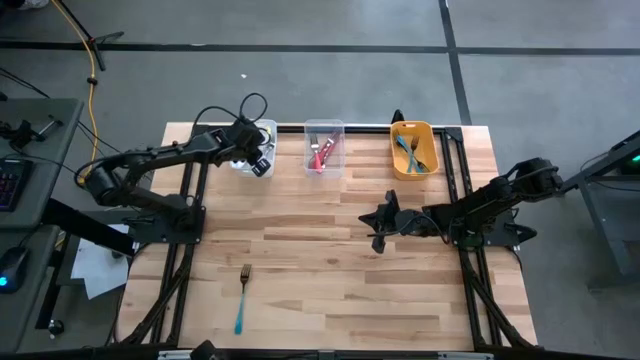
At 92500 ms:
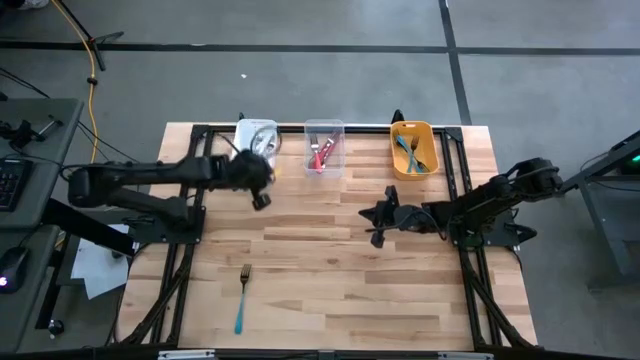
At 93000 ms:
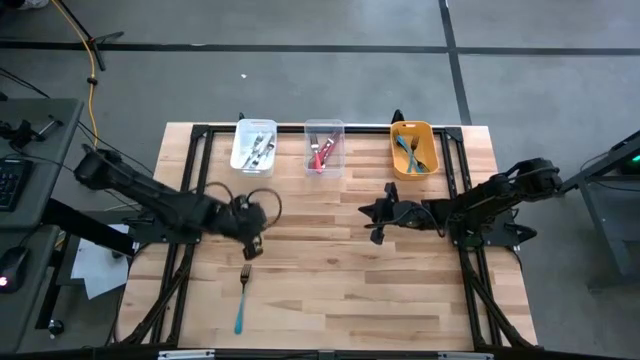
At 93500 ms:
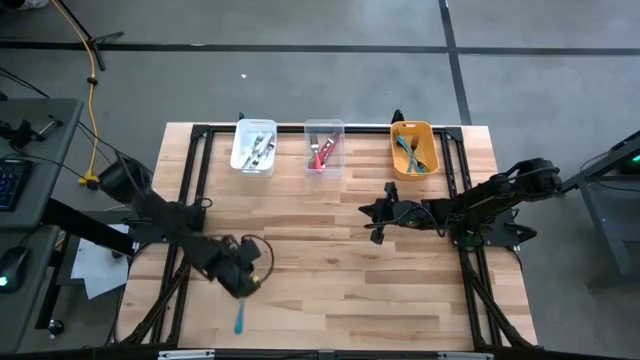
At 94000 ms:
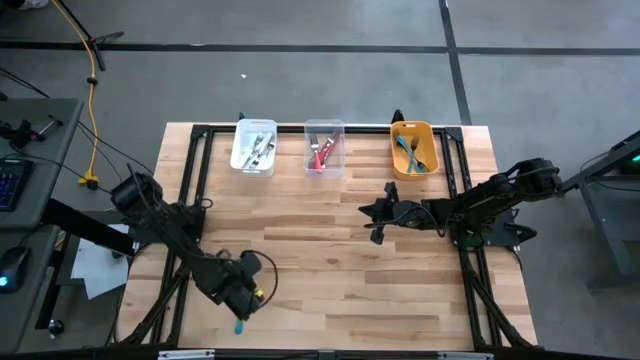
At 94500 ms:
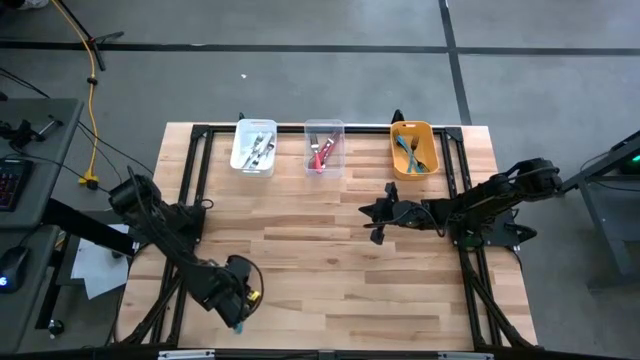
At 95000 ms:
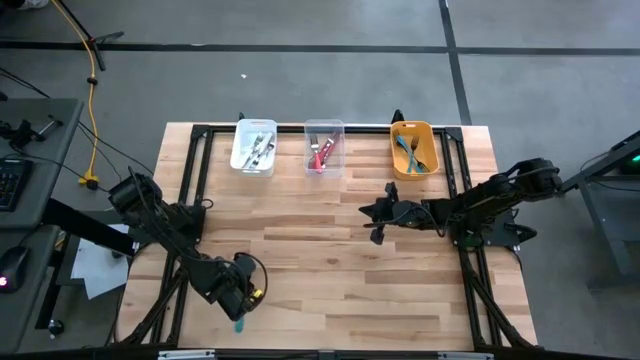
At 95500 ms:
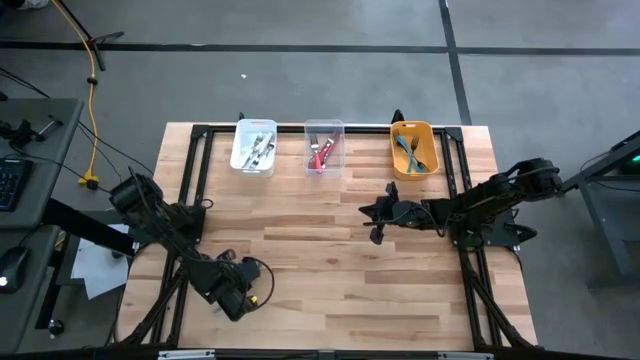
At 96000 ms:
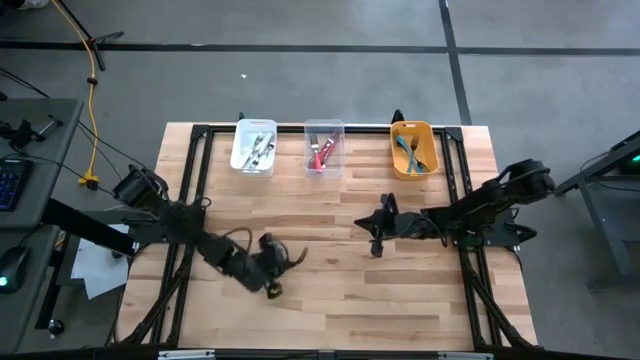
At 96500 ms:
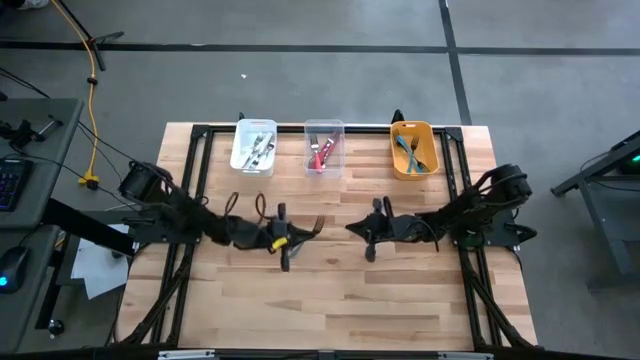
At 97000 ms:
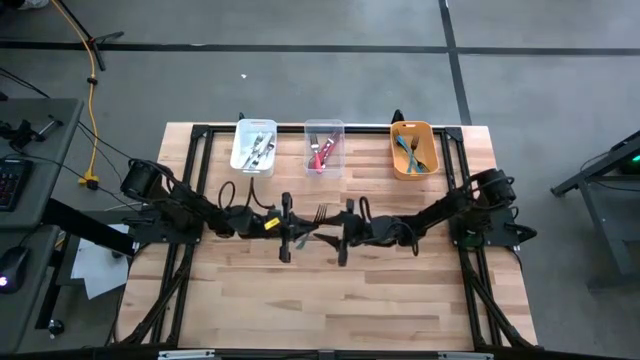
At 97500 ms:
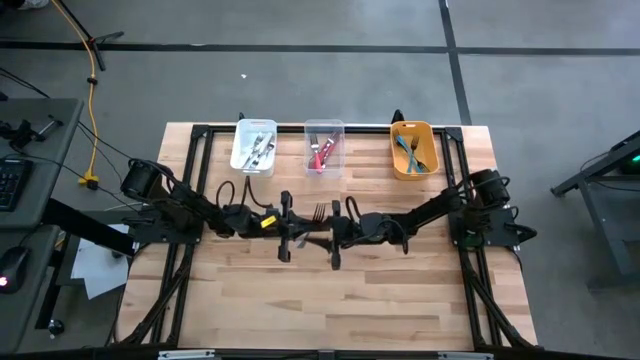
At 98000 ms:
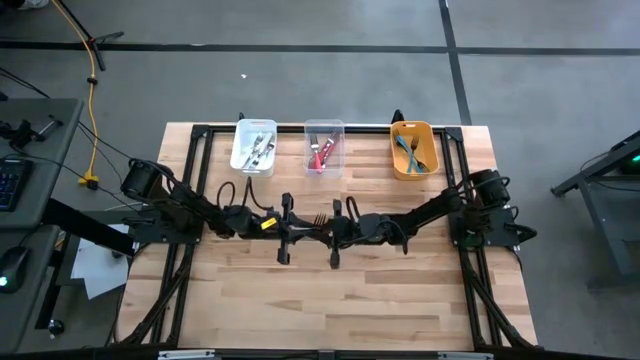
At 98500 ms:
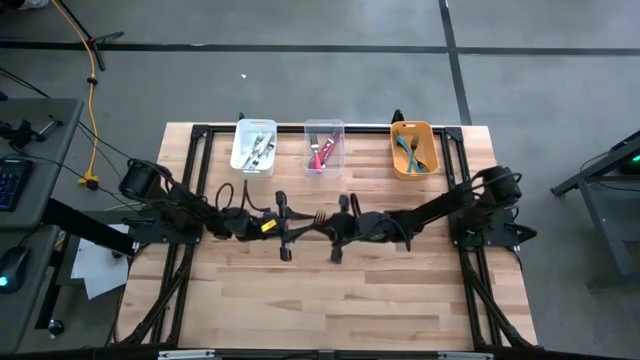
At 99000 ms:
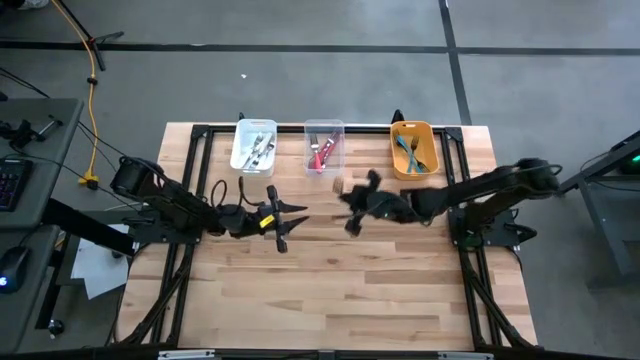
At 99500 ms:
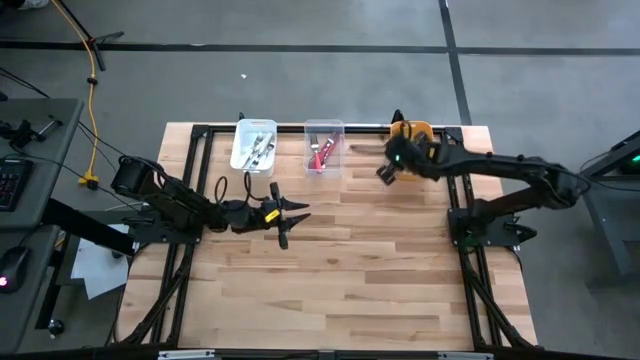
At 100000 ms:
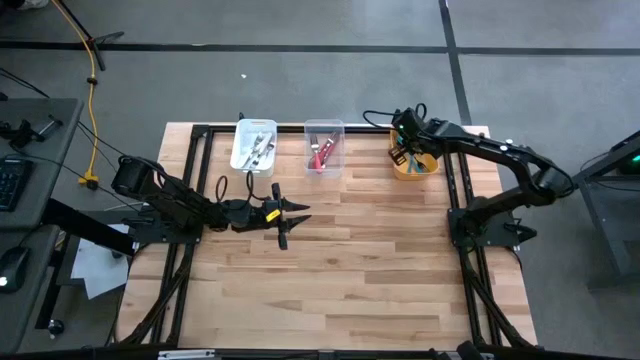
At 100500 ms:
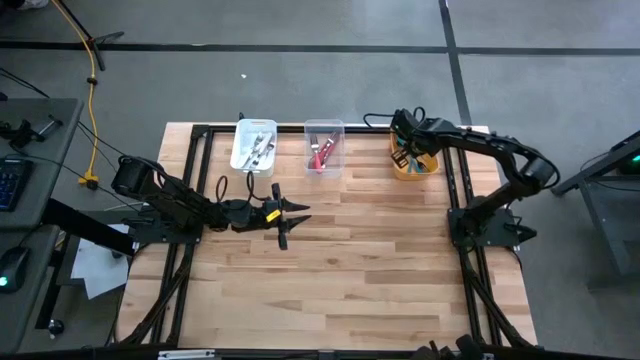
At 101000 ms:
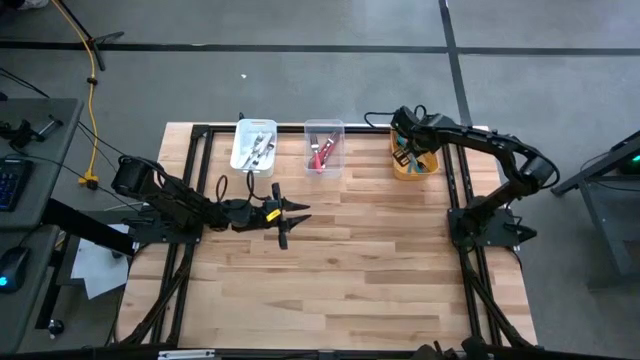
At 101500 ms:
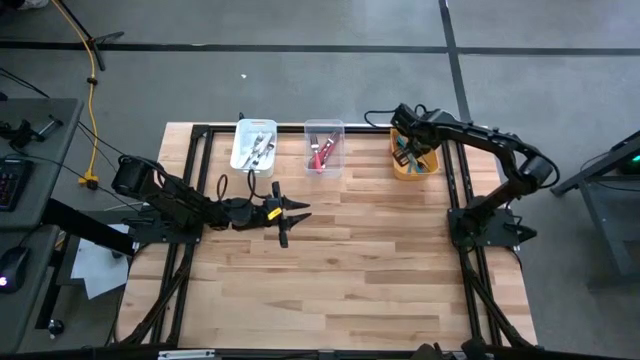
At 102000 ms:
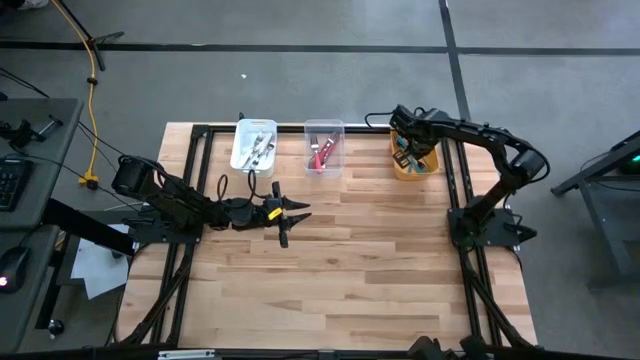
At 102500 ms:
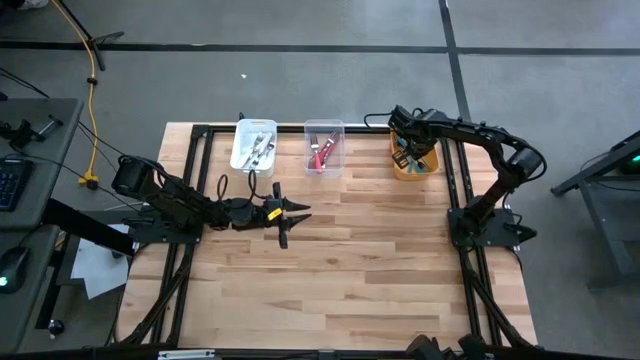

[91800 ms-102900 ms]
Task: Sort silverware by color (type)
Put the blue fork into the yellow bin

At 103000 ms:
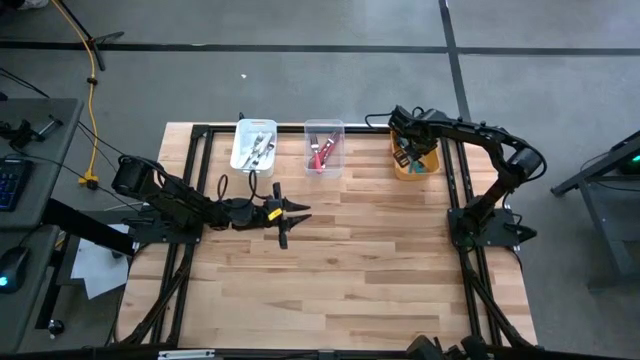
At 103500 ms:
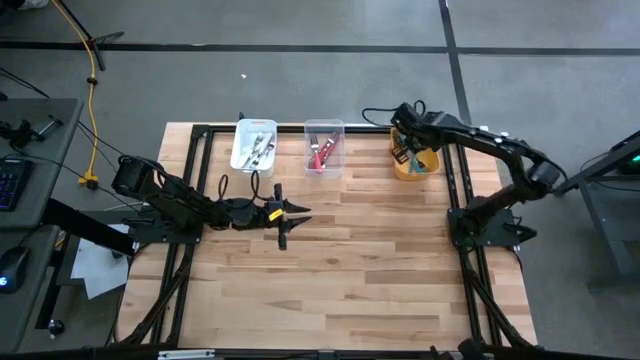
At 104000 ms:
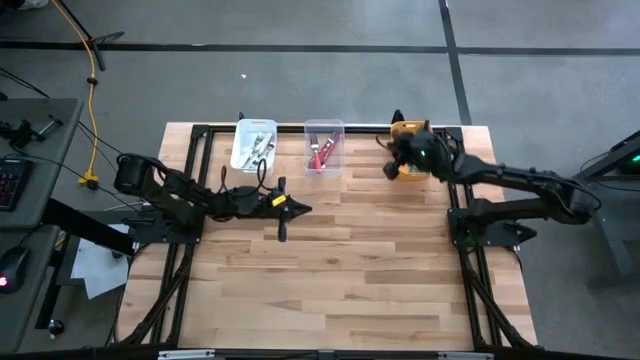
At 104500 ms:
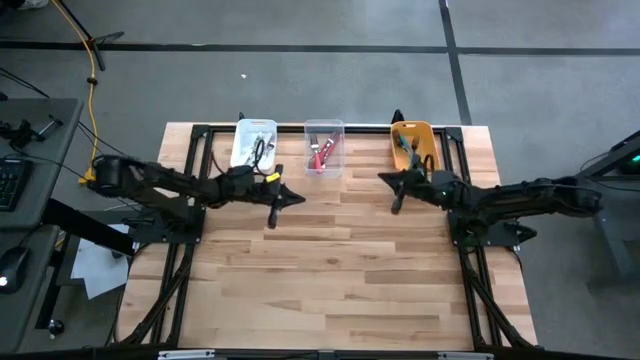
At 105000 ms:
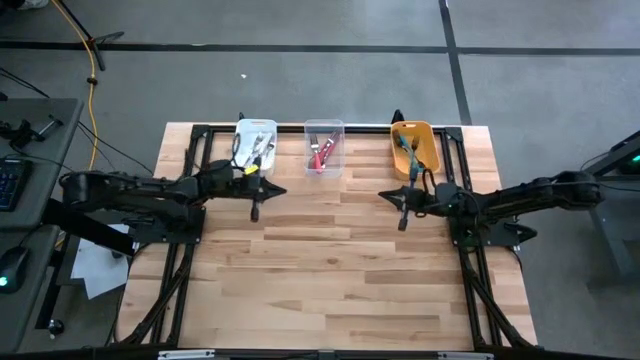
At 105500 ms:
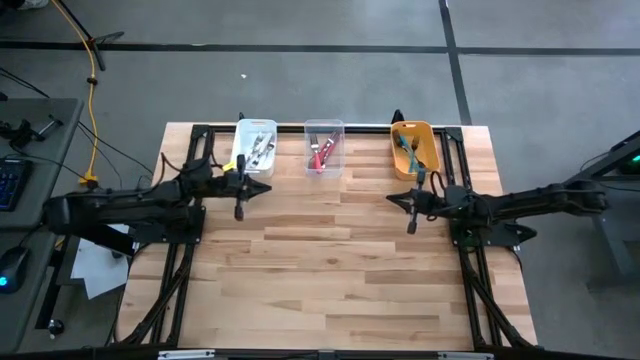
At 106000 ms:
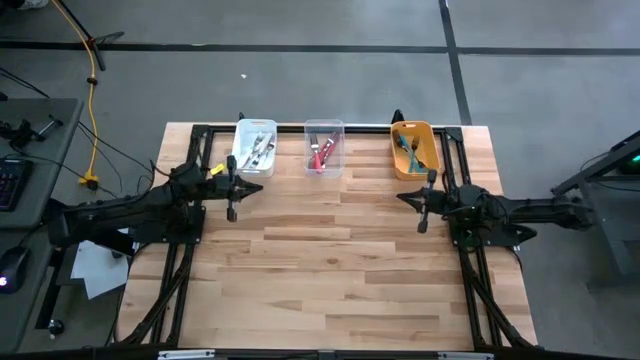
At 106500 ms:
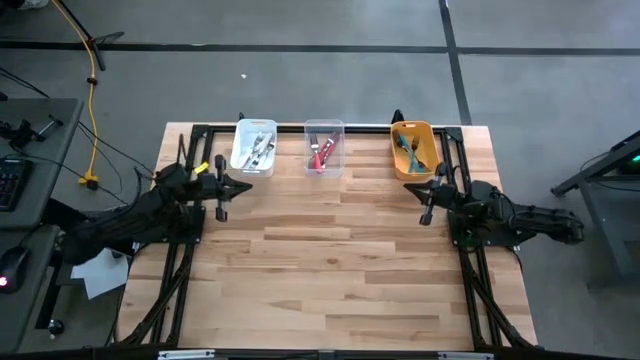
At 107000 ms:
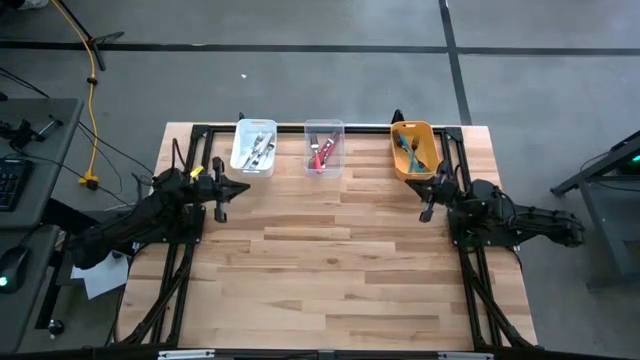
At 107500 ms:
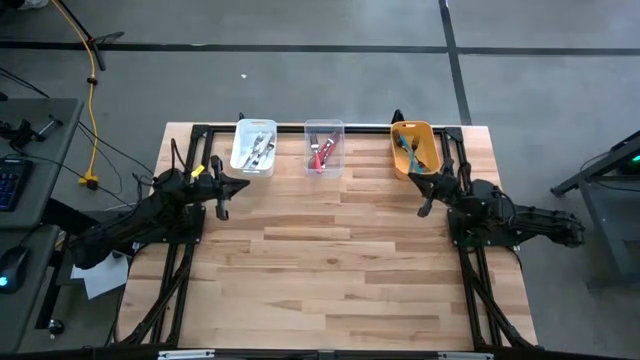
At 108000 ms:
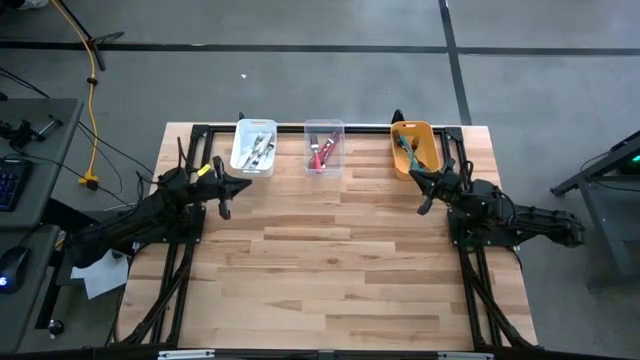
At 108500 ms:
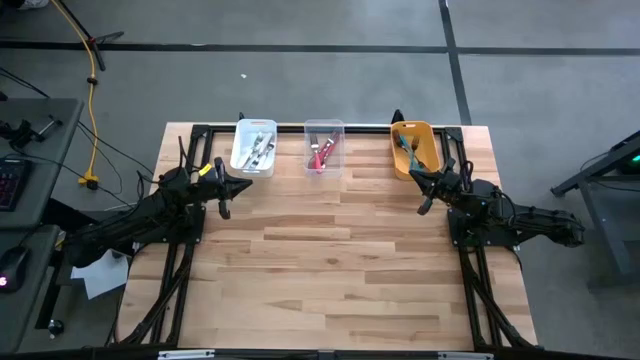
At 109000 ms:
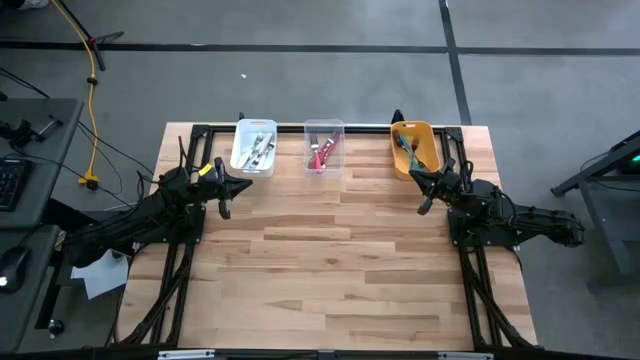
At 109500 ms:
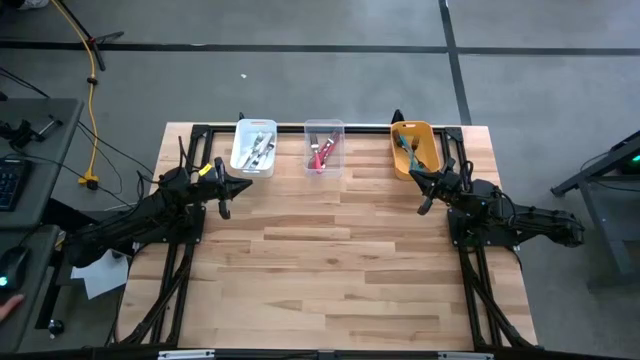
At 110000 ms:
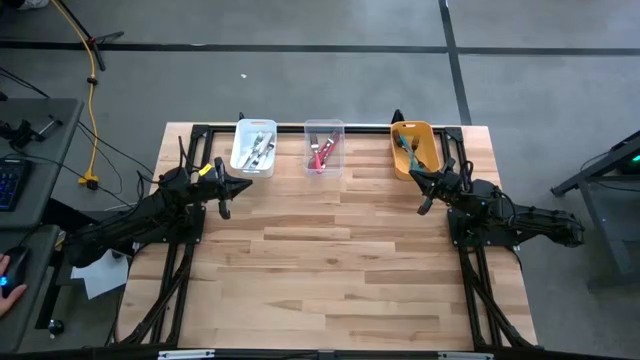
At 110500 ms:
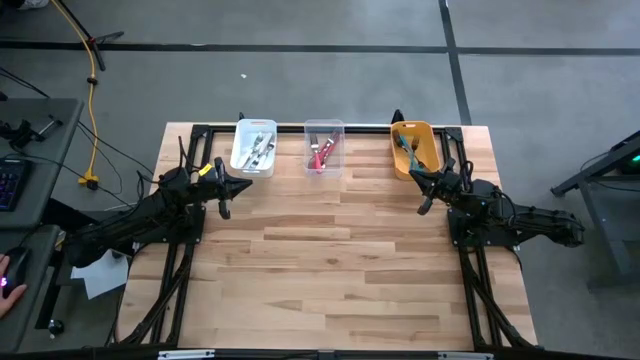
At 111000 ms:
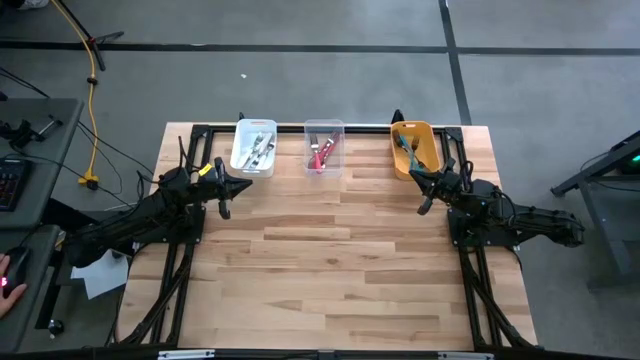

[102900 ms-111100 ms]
Return to Home Position

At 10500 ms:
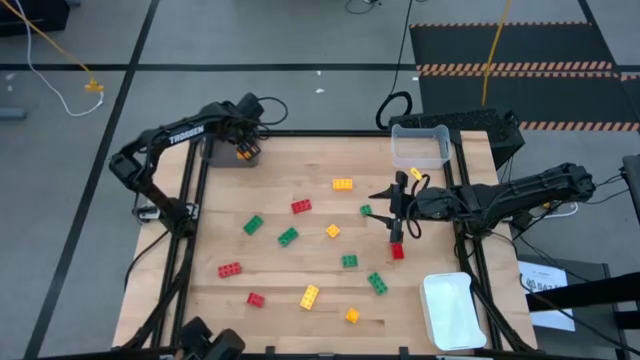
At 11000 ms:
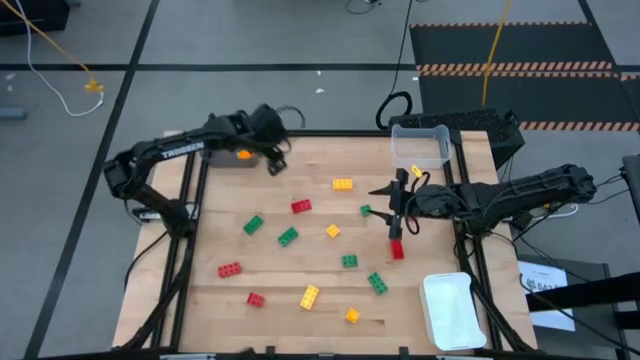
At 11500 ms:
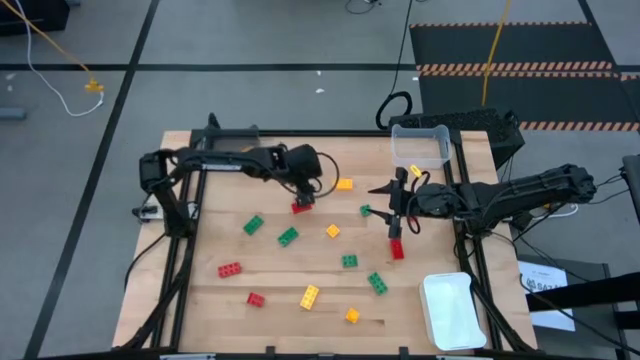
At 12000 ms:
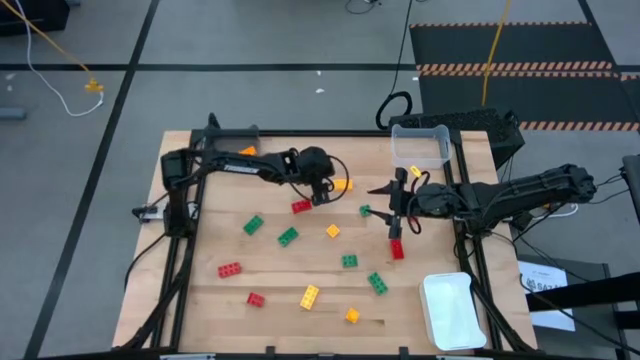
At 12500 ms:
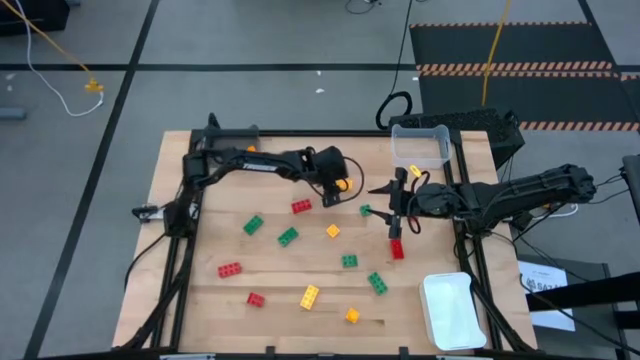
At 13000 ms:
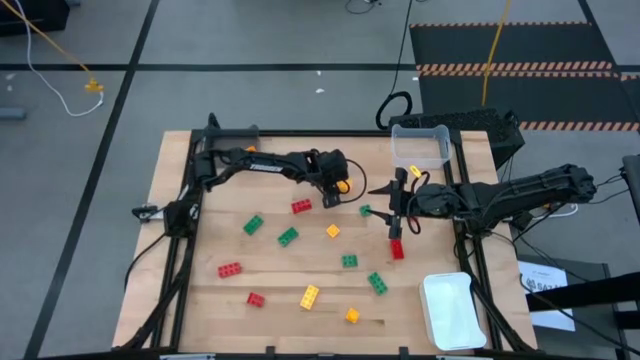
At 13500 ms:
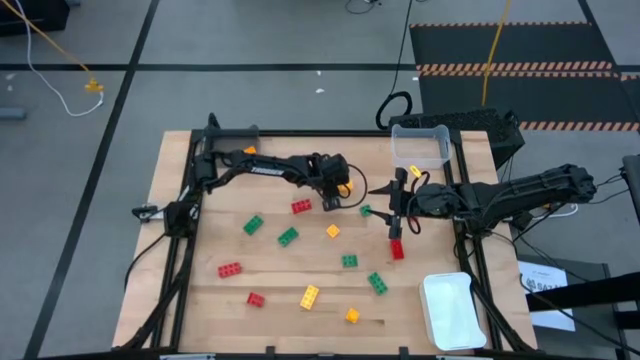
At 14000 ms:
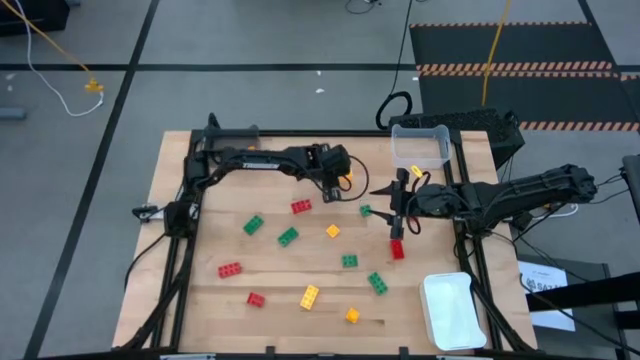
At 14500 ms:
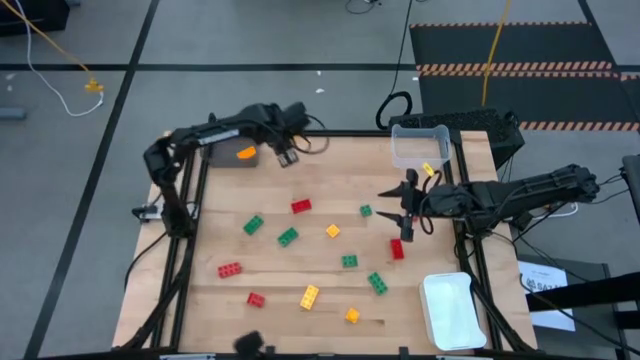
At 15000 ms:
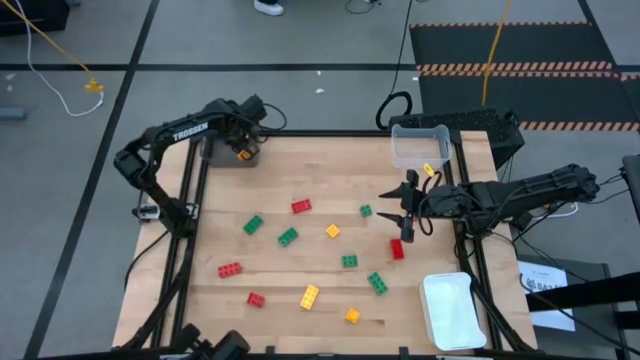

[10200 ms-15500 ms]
Task: Sort & place blocks by color
Put the yellow gamepiece into the black bin
